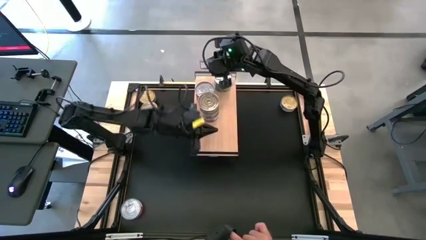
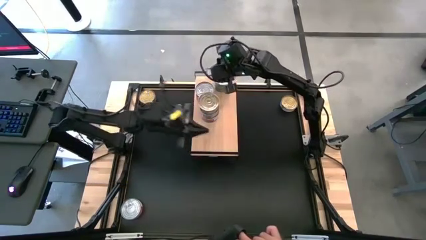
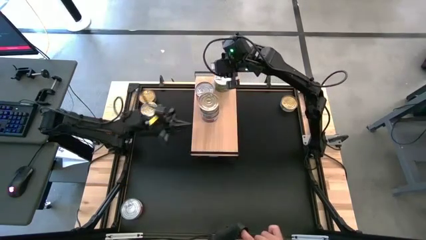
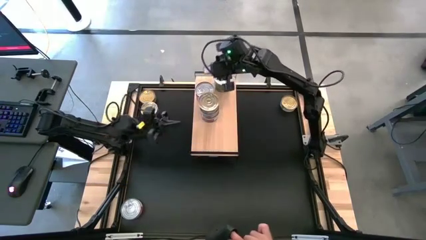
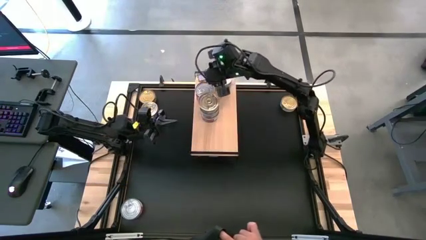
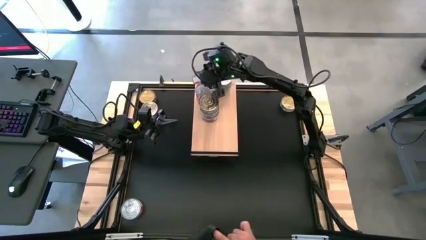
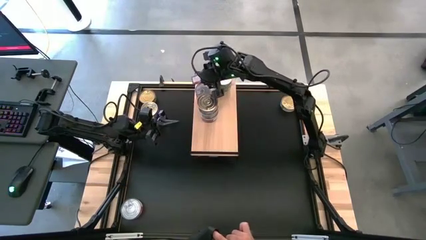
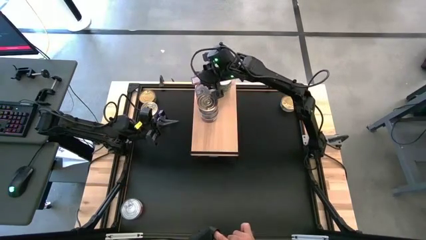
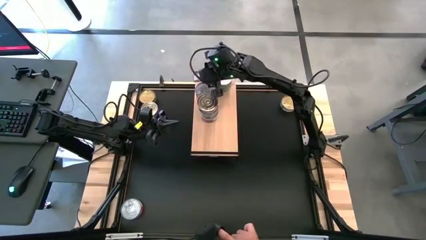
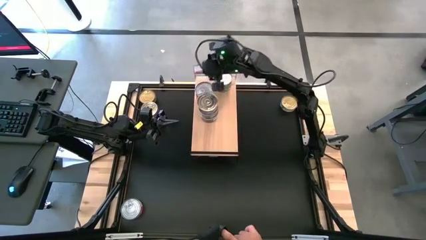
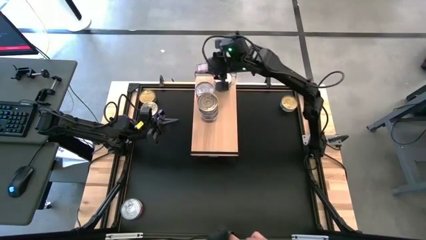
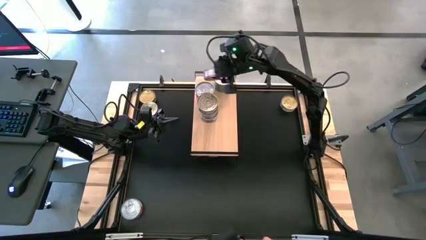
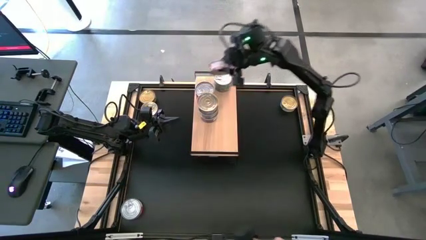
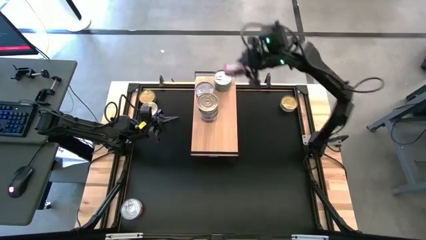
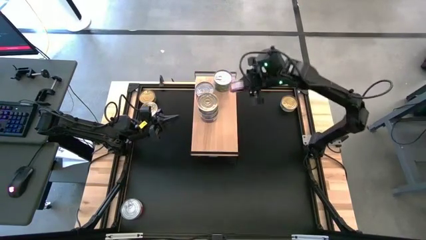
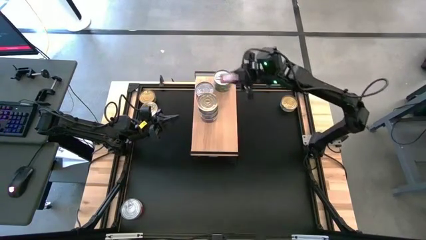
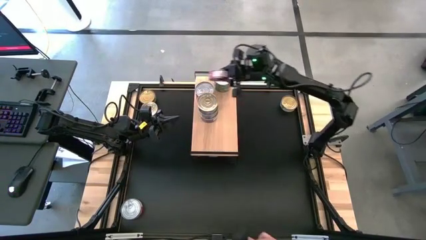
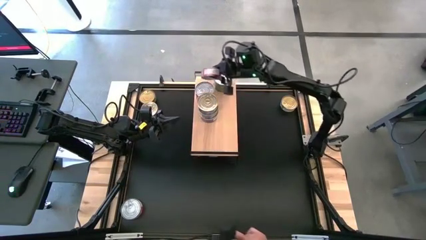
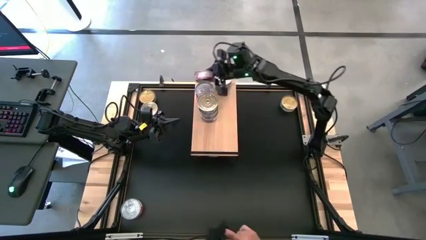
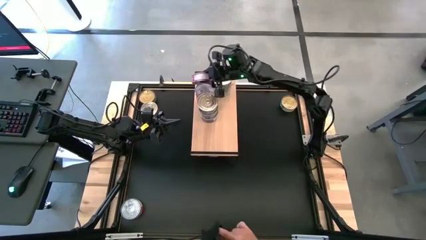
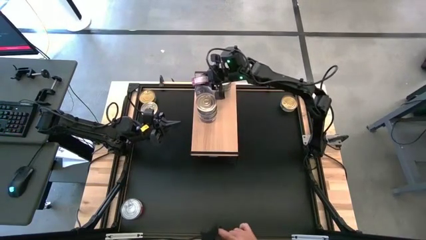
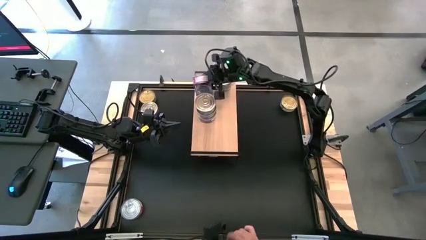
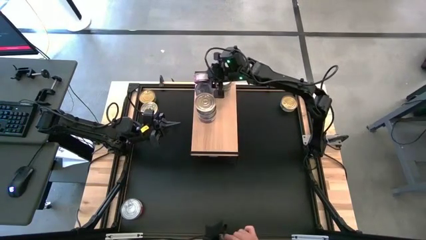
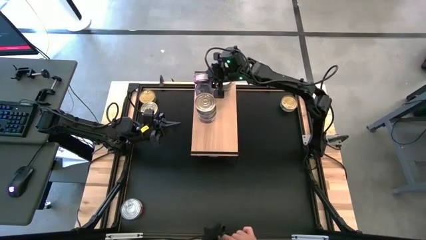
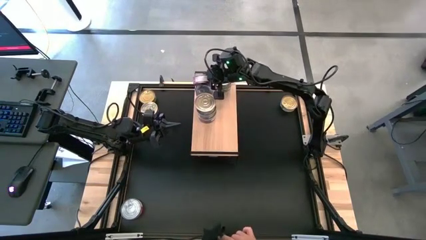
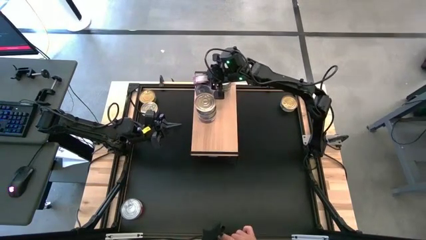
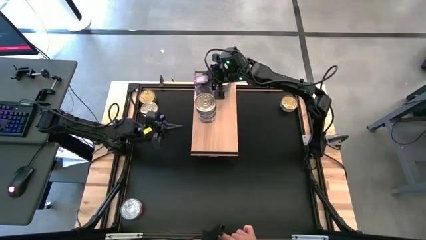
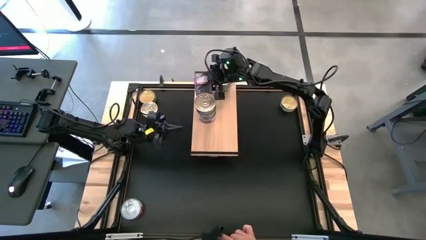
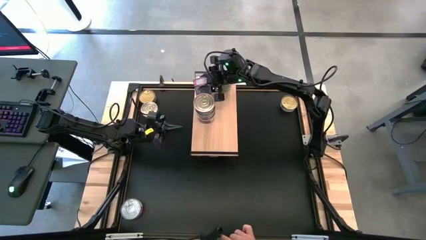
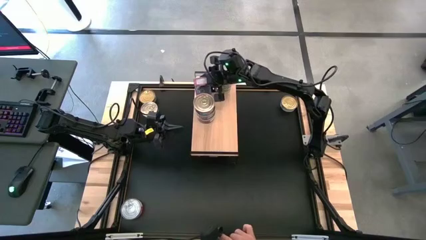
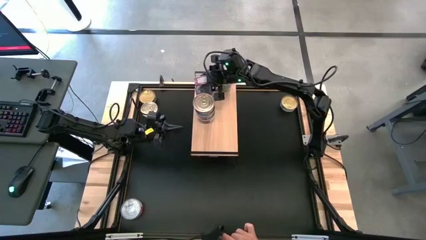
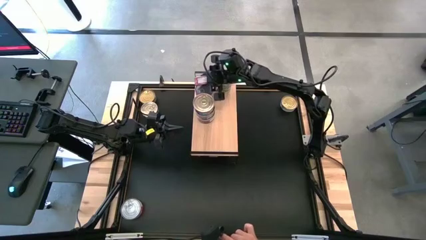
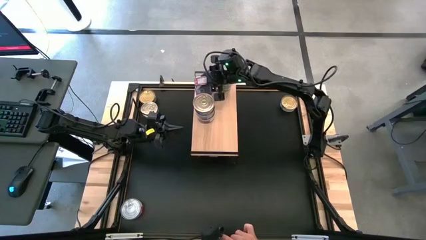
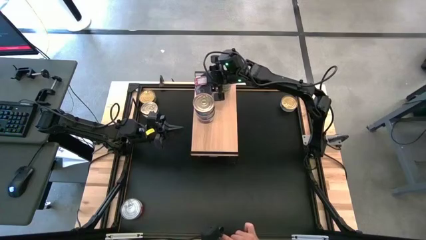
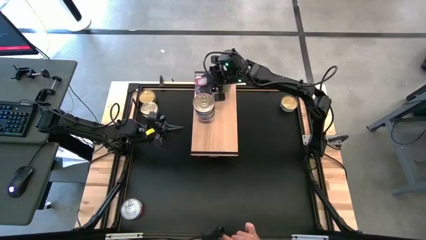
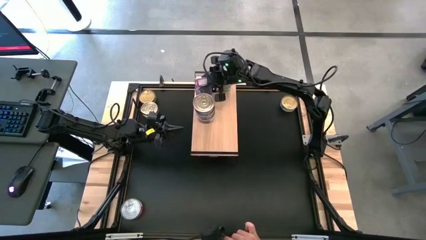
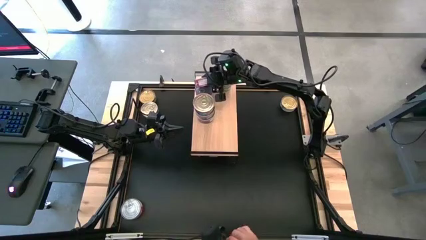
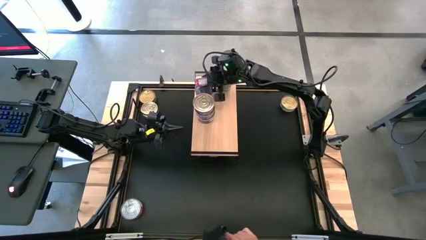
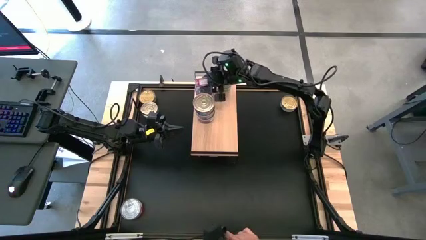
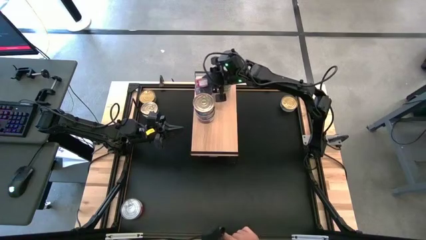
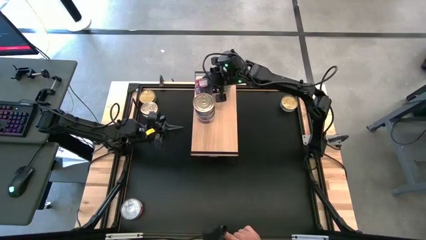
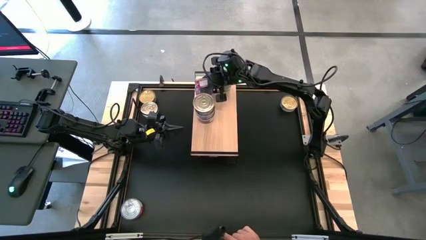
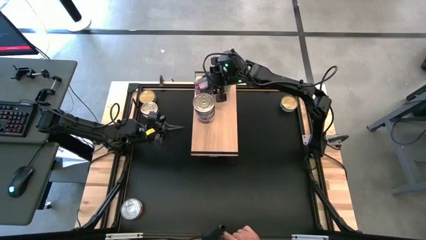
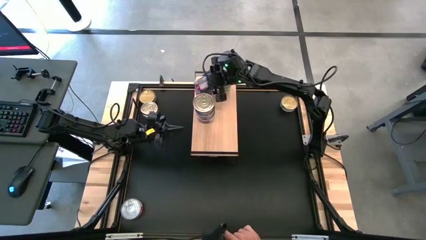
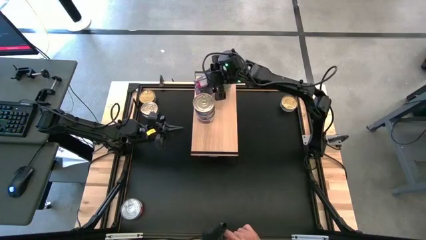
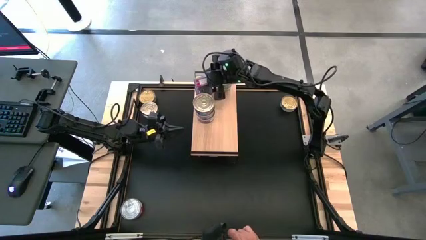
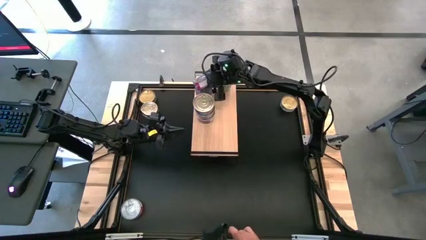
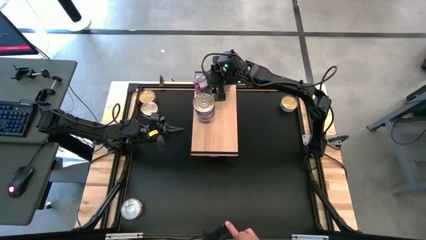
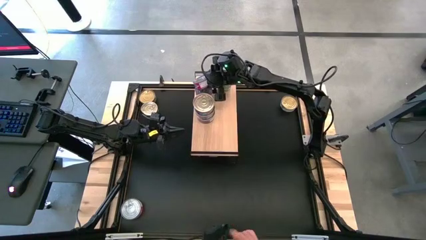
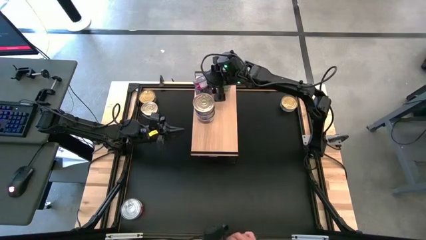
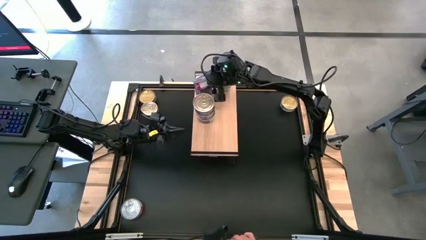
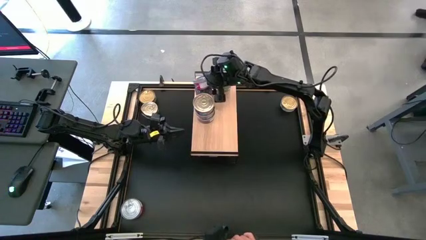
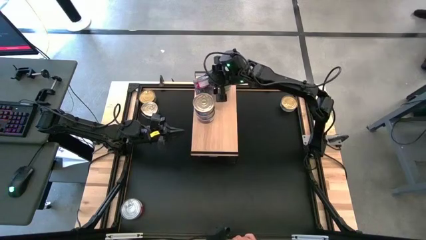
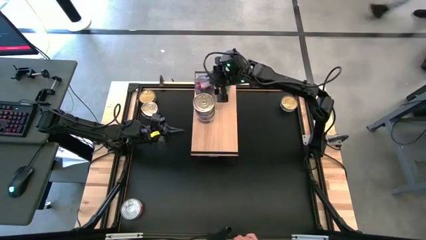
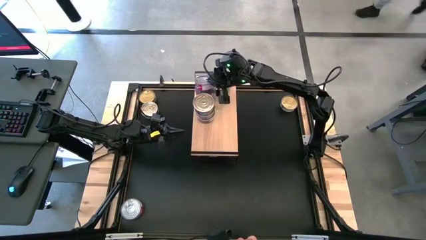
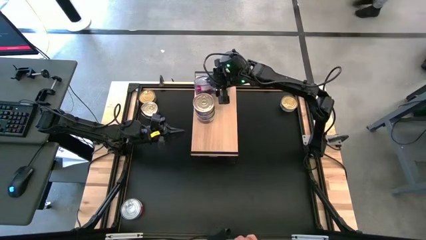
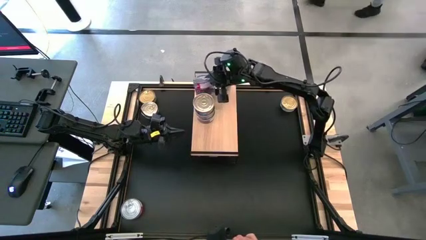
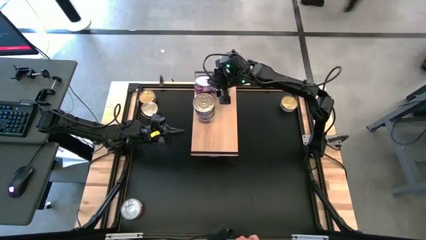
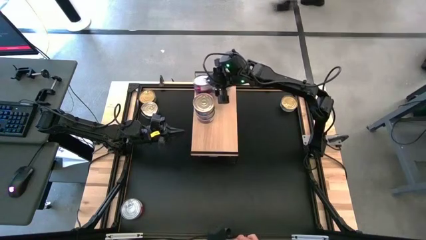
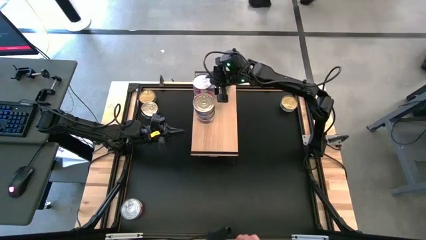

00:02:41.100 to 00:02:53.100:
Task: Stack canned seafood by type on shelf
Stack the red tuna can on top of the red tuna can on the shelf

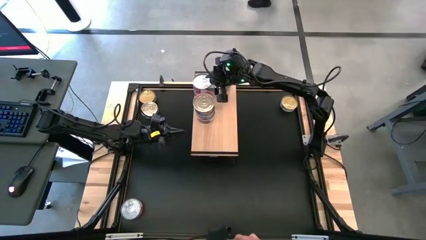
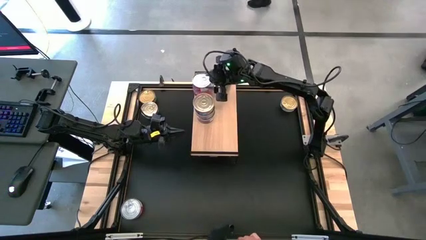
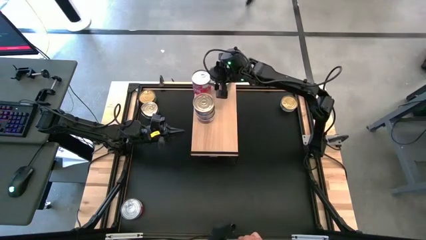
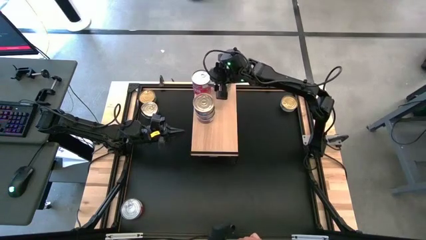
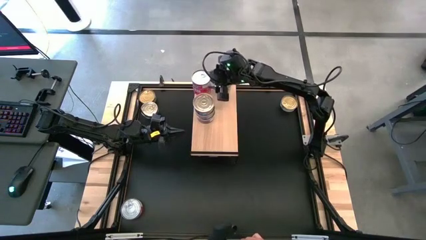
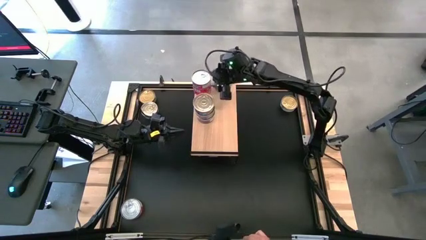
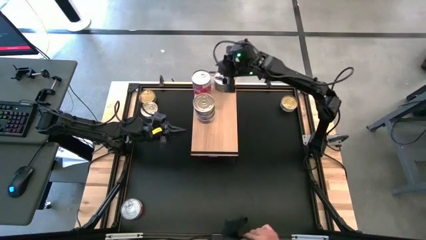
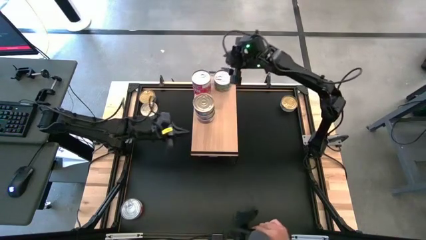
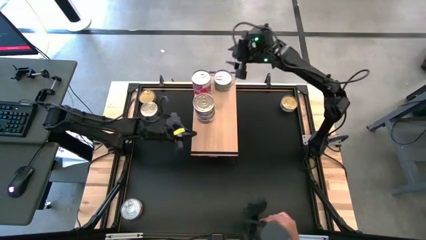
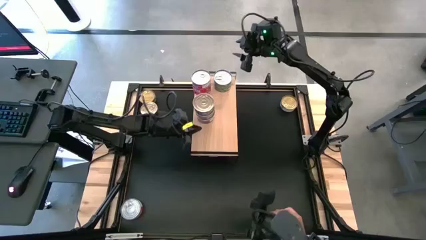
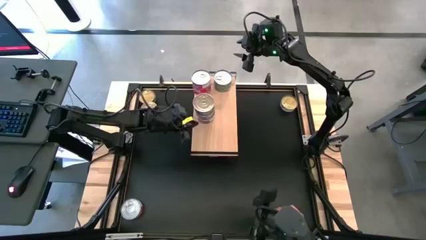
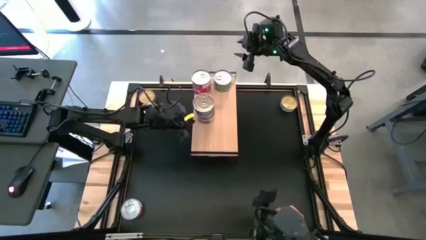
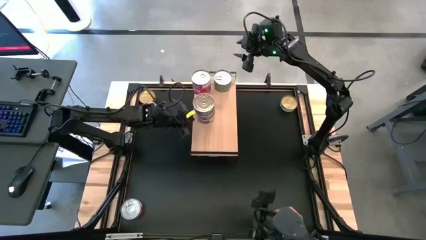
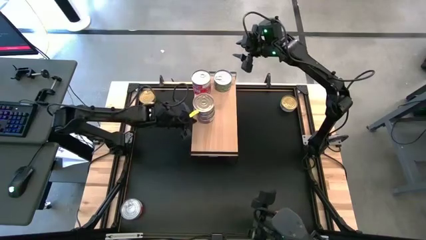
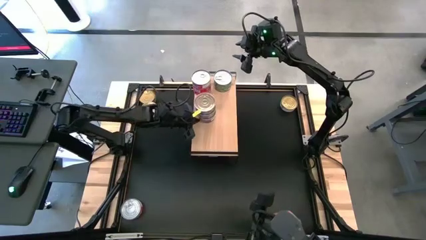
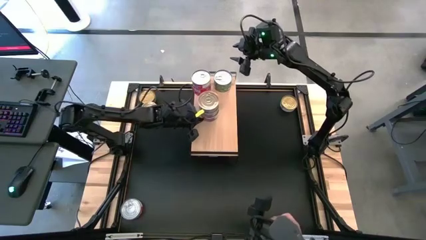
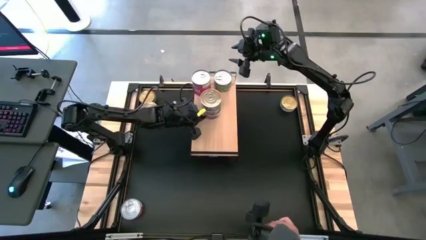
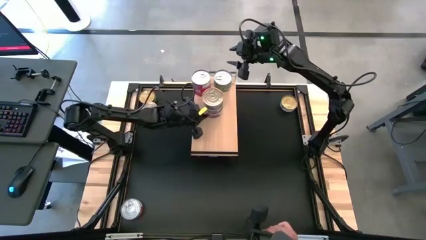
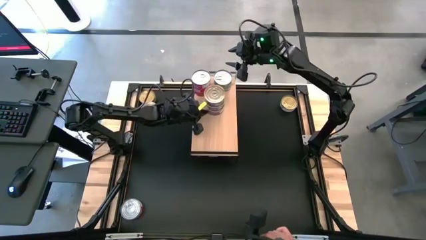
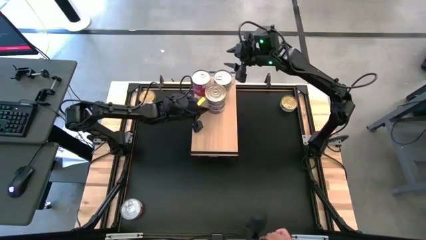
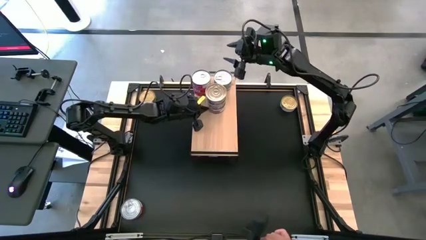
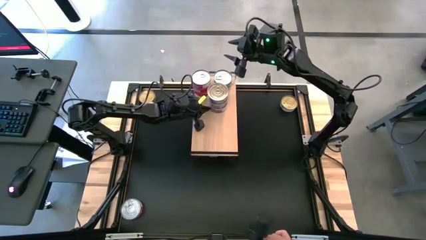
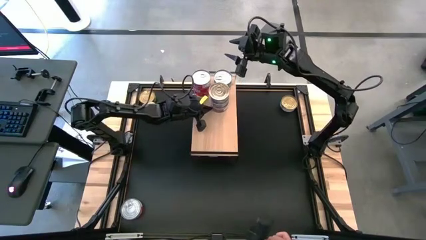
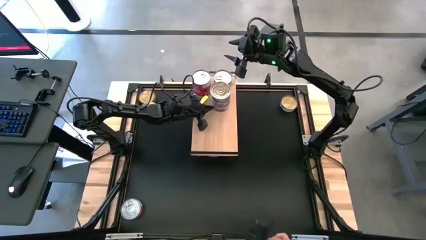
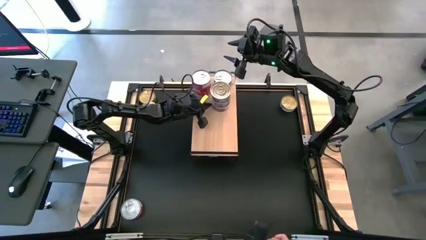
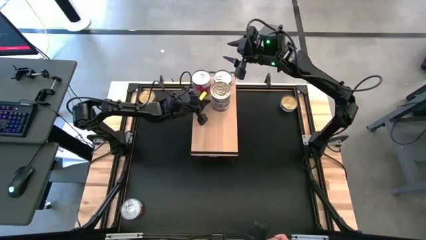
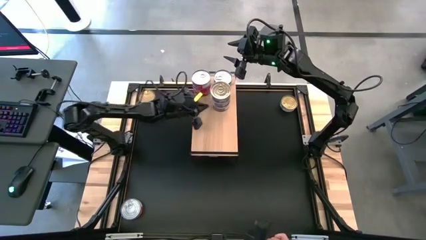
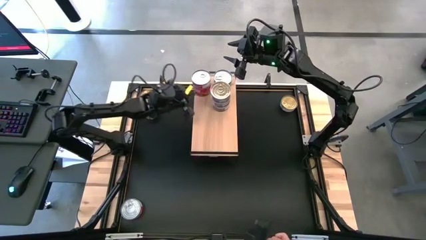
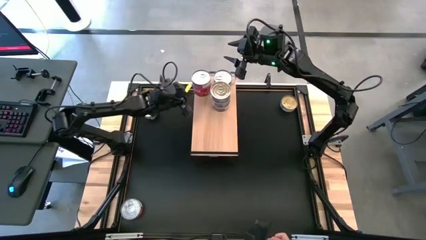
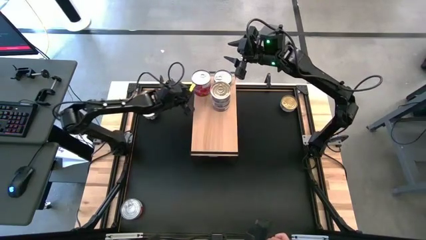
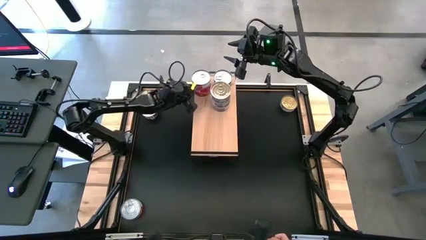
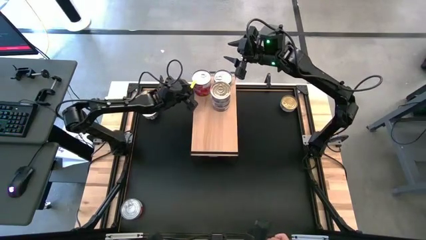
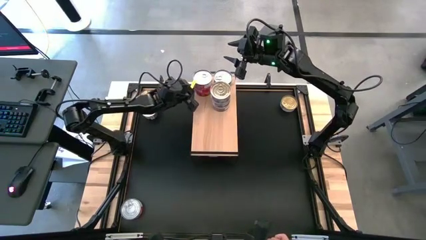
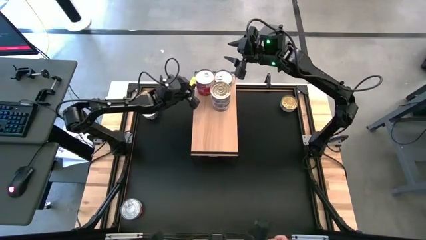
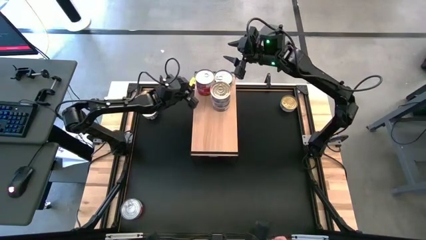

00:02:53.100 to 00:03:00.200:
Adjust the stacked tuna cans on the shelf
